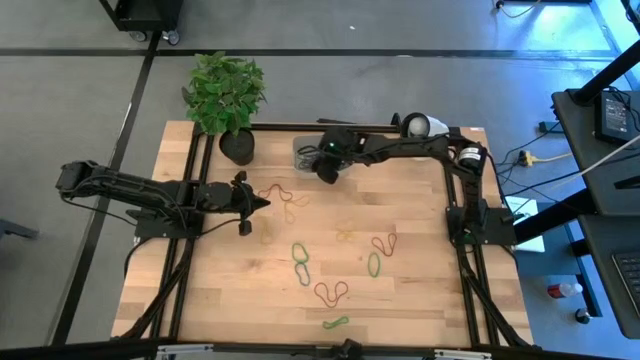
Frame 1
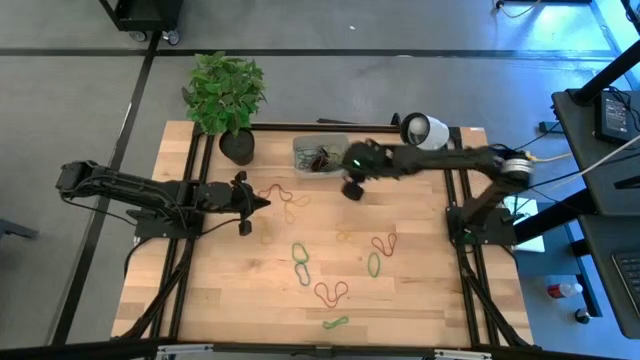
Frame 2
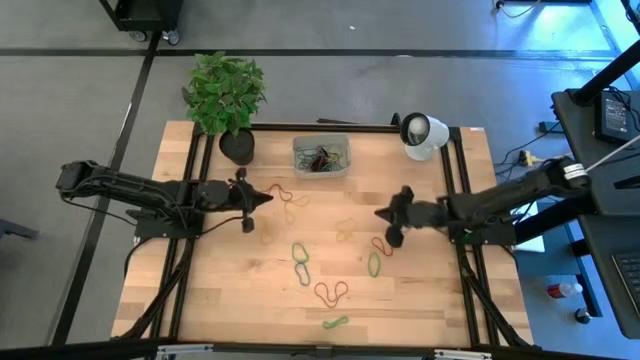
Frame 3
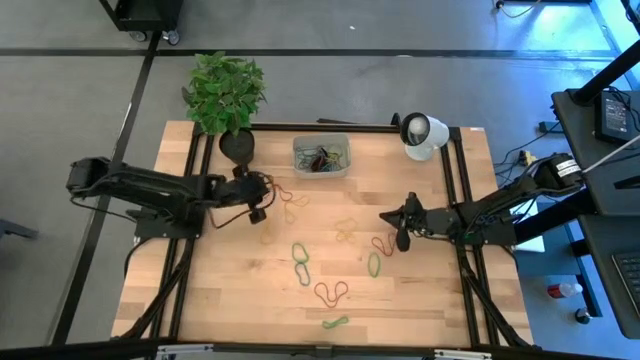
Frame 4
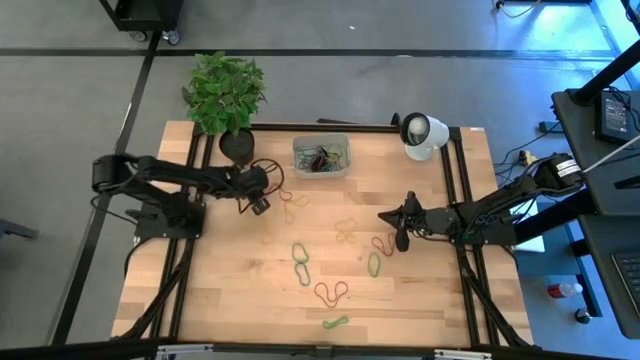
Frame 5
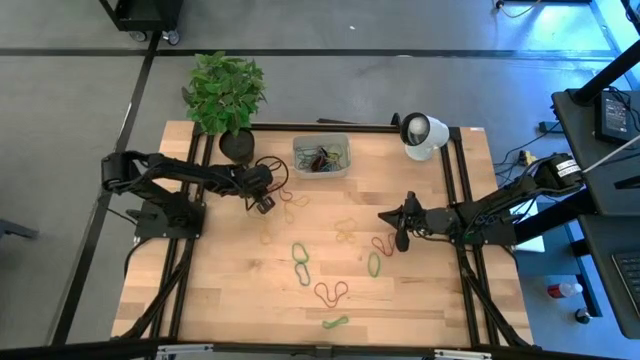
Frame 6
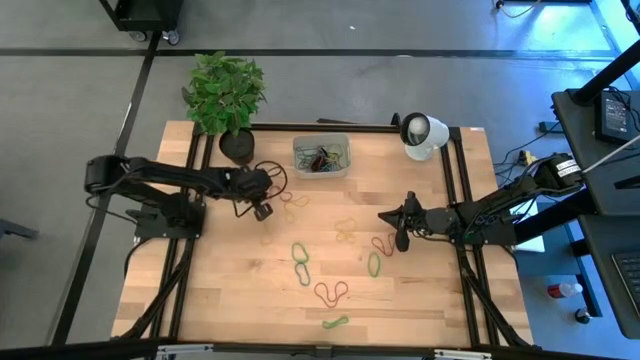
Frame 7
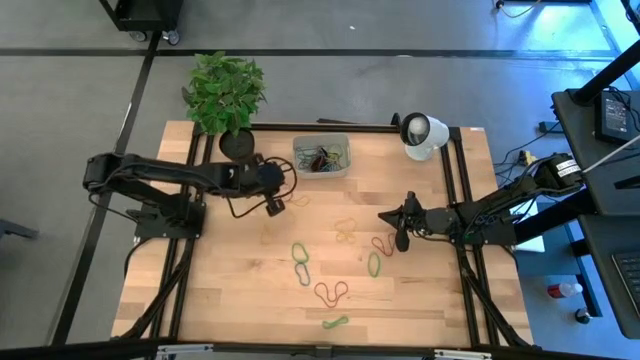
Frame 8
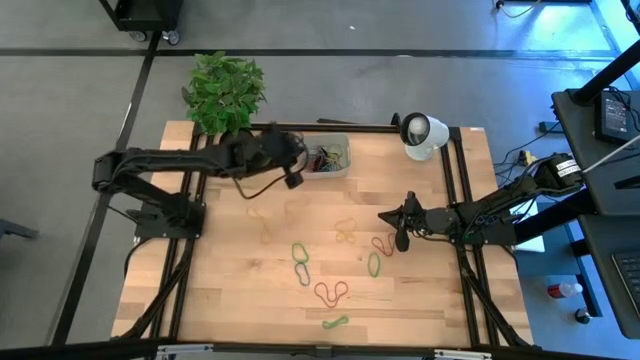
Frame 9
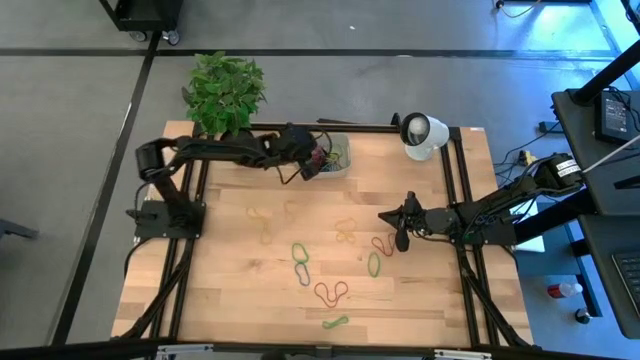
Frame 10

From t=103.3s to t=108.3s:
Task: Pick and place rubber bands into bin
Put the red rubber band into the gray bin

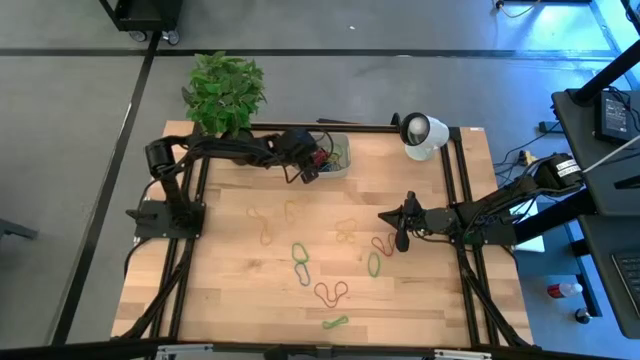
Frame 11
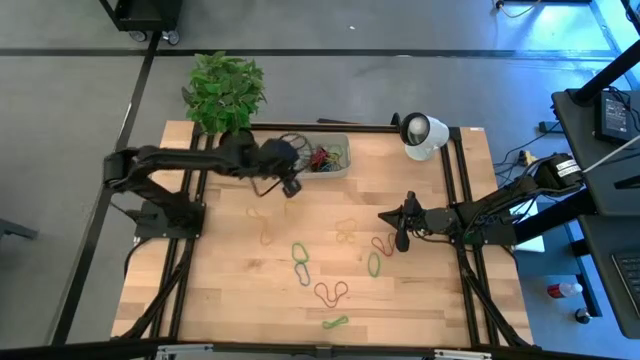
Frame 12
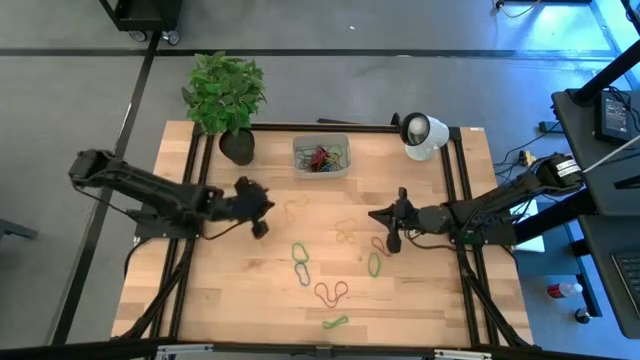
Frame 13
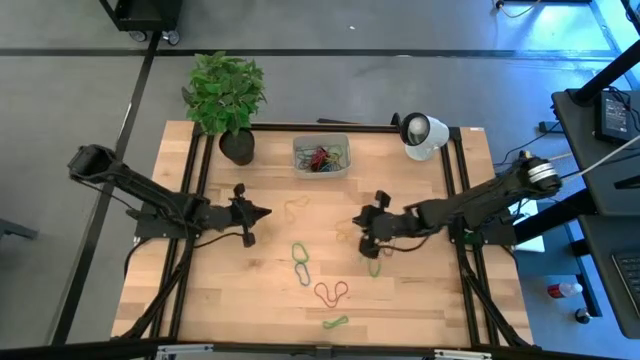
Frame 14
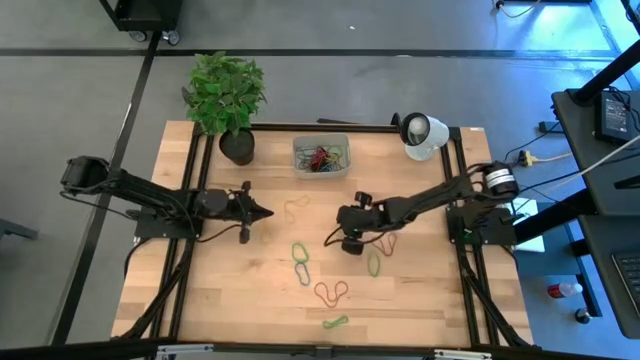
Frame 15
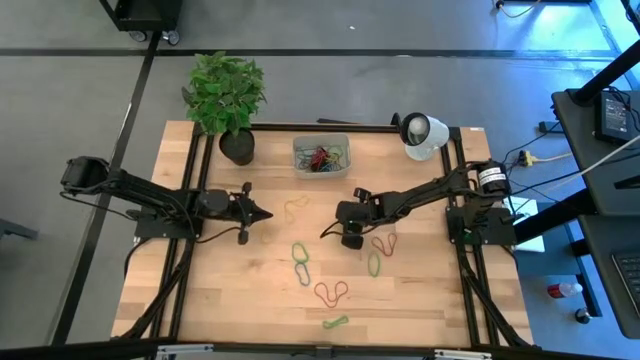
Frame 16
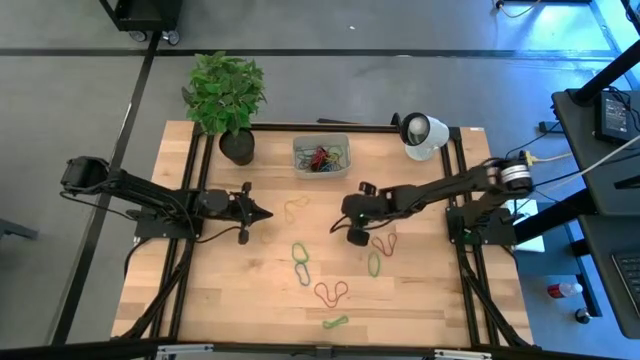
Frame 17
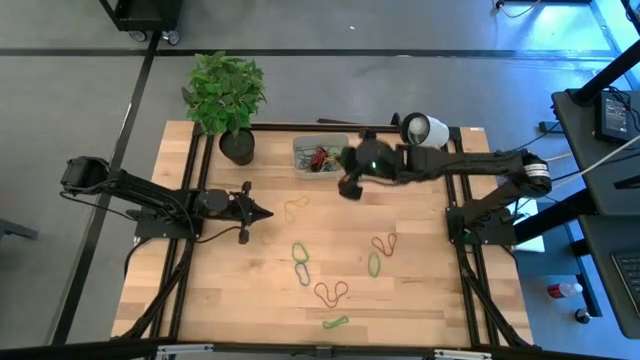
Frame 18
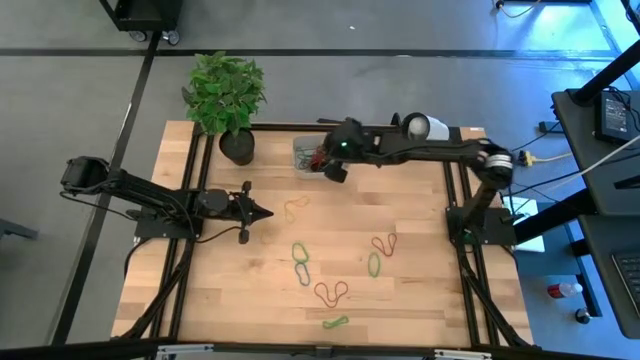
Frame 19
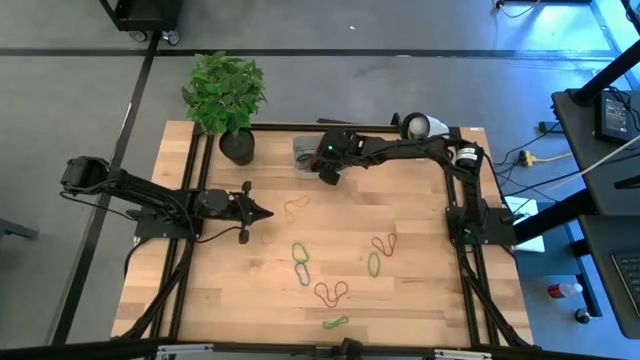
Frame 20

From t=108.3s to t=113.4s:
Put the yellow rubber band into the gray bin

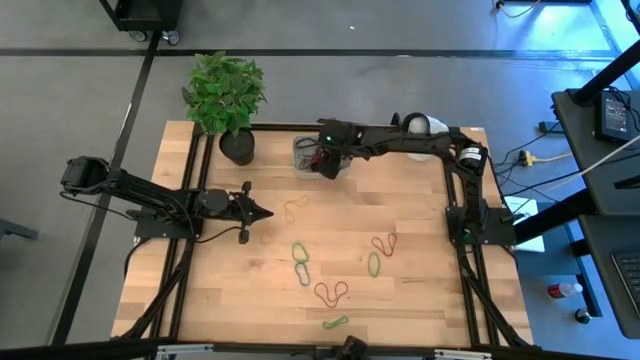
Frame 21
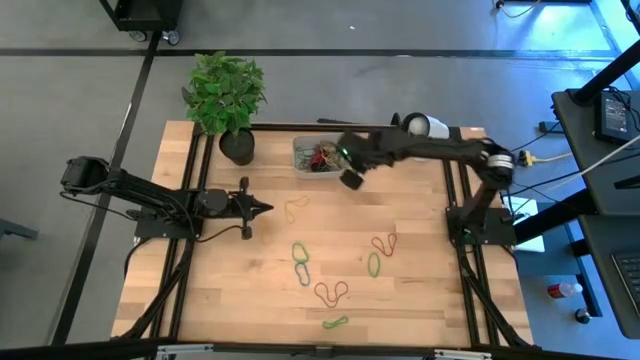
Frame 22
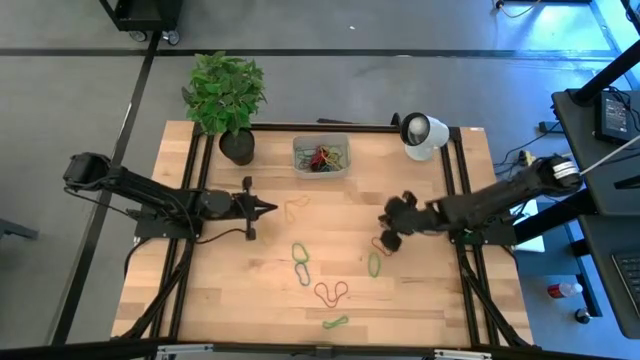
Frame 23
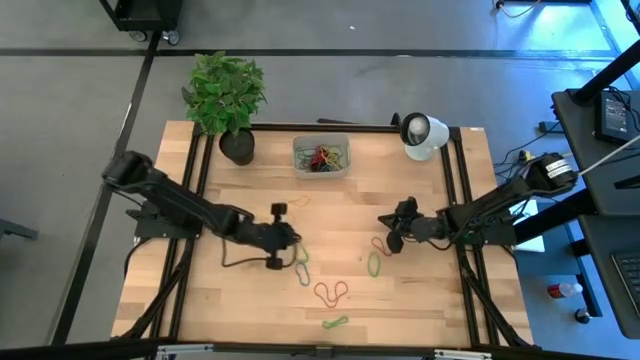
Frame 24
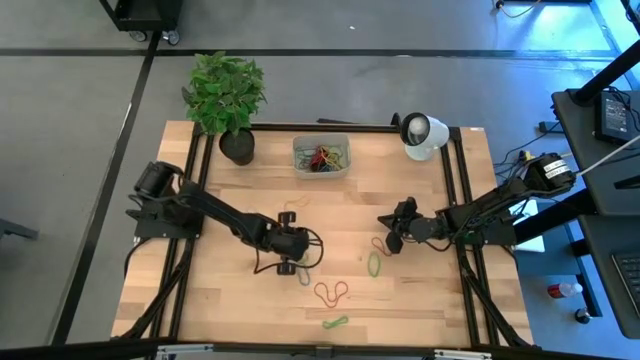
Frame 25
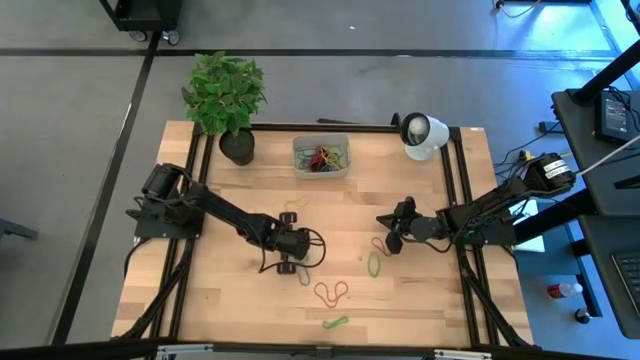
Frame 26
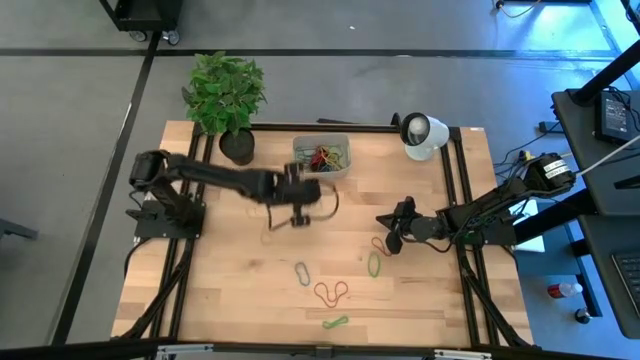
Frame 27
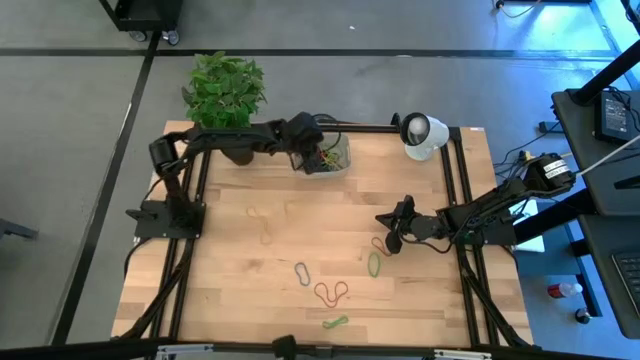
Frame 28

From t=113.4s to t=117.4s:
Put the green rubber band into the gray bin

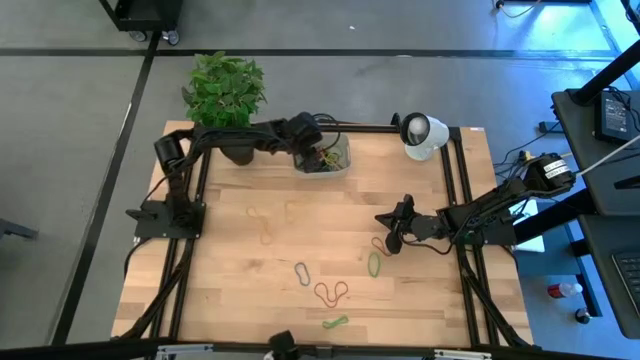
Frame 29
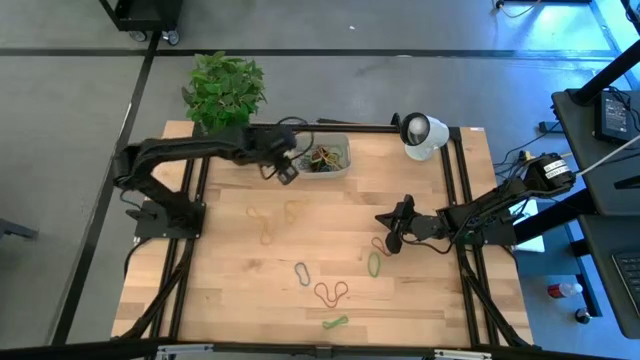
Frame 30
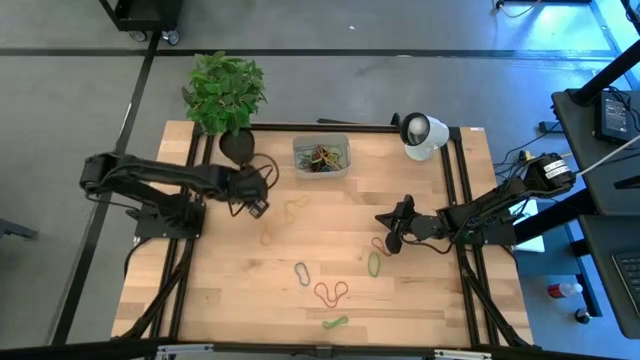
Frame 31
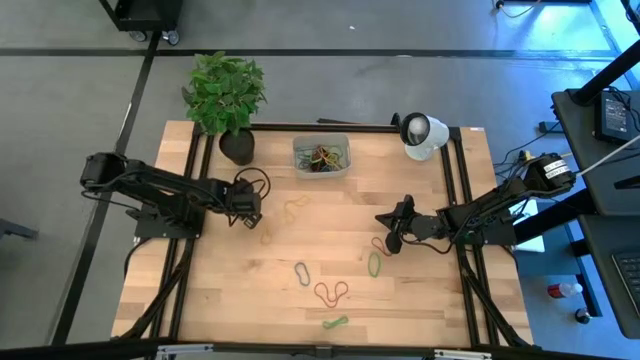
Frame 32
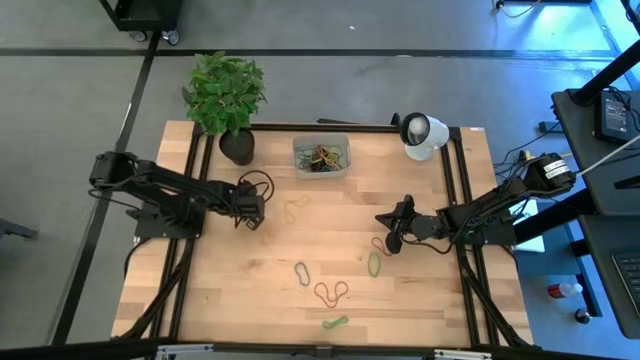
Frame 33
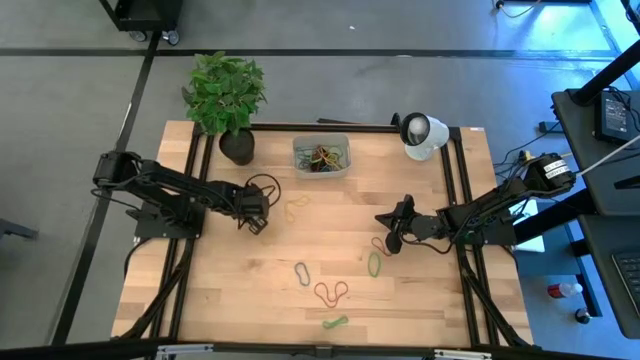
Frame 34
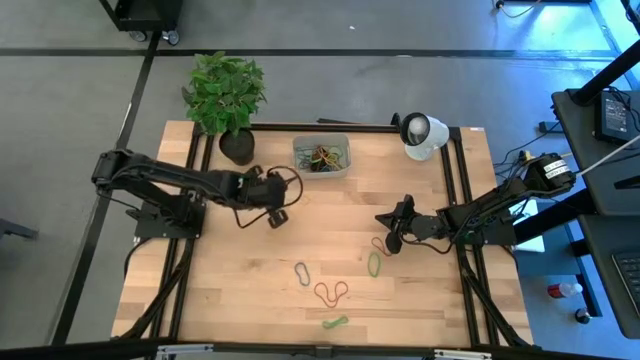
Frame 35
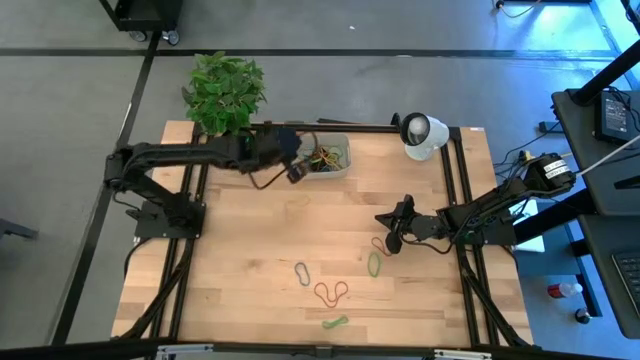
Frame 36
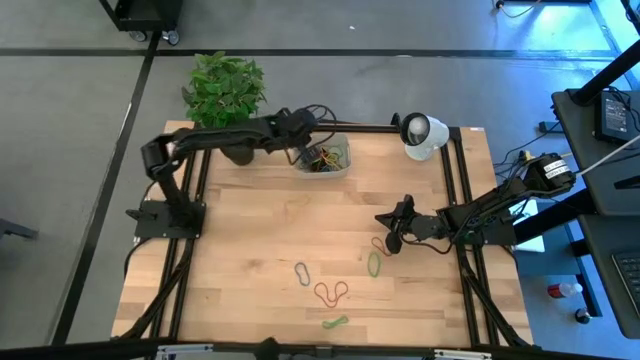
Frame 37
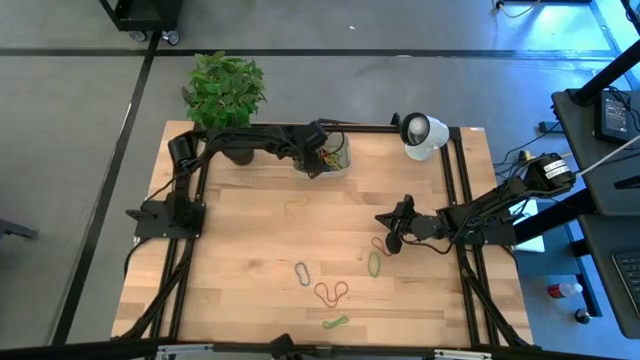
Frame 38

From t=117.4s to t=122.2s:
Put the yellow rubber band into the gray bin

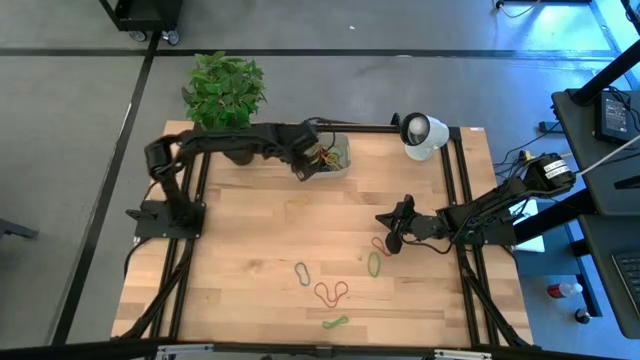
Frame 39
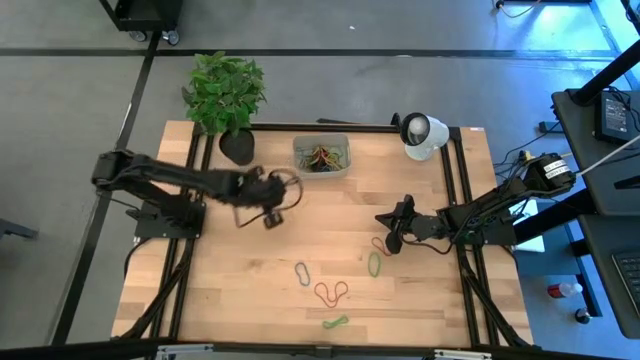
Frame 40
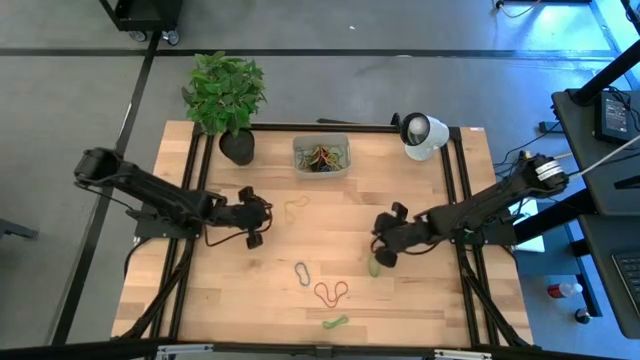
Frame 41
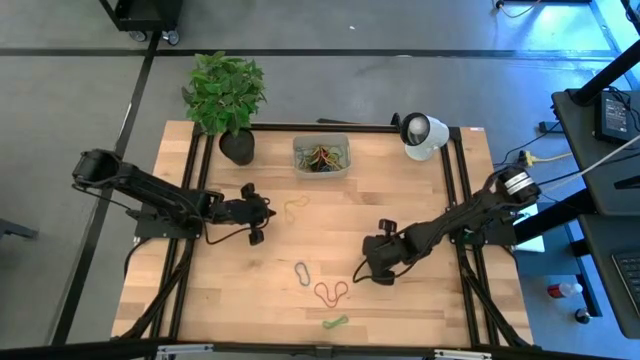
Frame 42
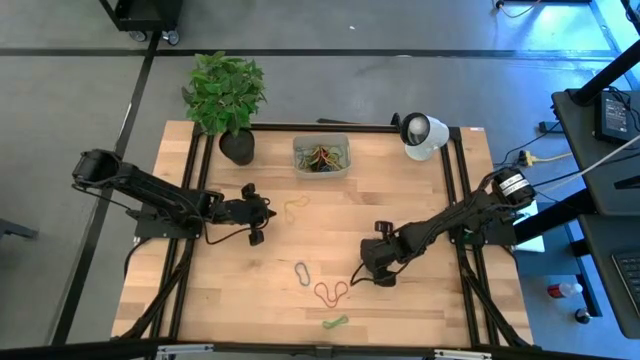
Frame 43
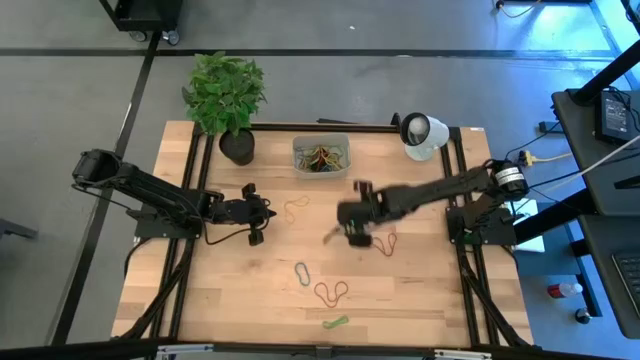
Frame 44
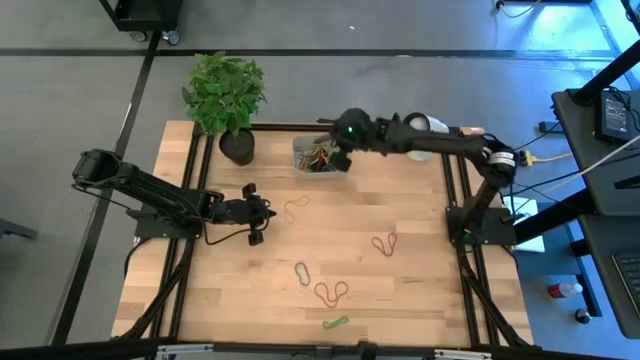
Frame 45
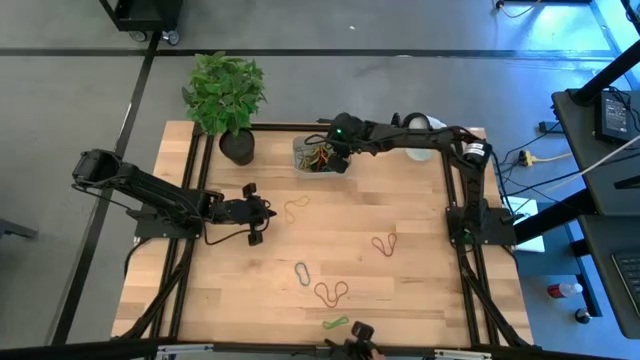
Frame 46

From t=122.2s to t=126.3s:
Put the green rubber band into the gray bin
